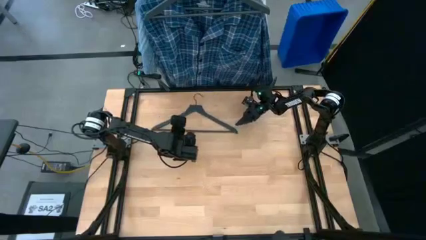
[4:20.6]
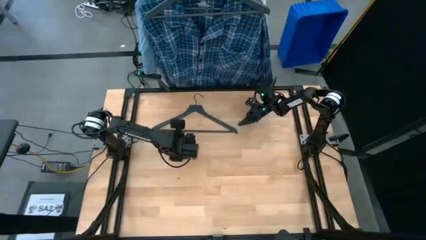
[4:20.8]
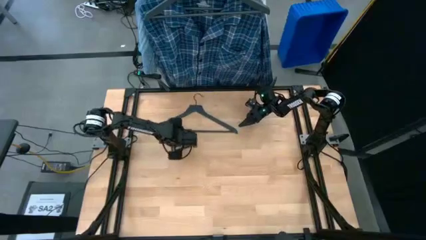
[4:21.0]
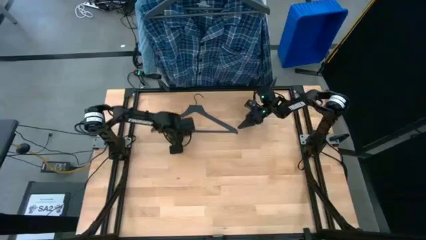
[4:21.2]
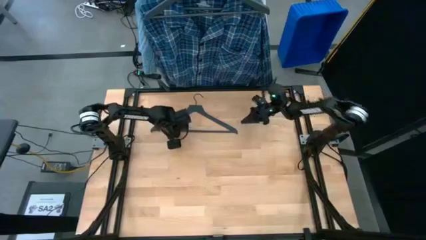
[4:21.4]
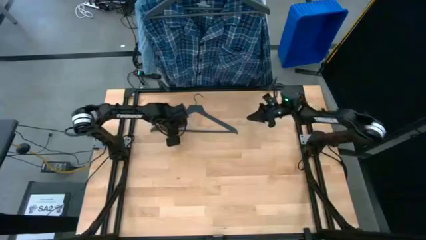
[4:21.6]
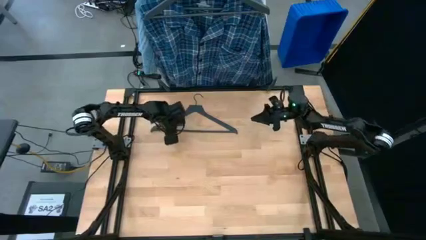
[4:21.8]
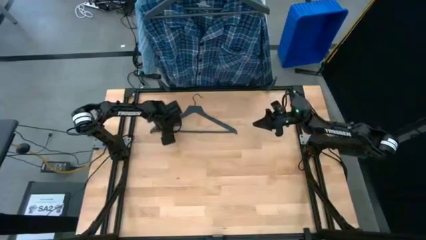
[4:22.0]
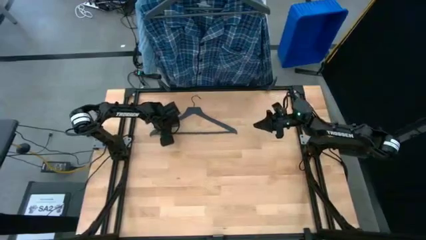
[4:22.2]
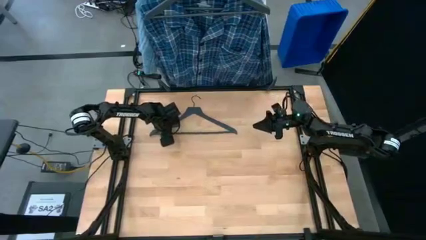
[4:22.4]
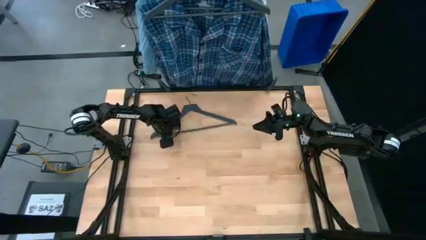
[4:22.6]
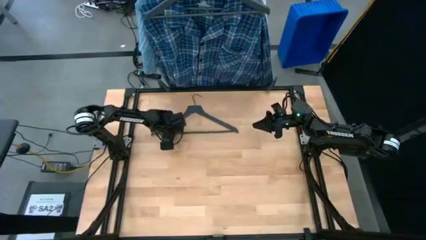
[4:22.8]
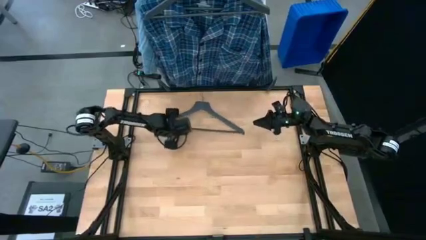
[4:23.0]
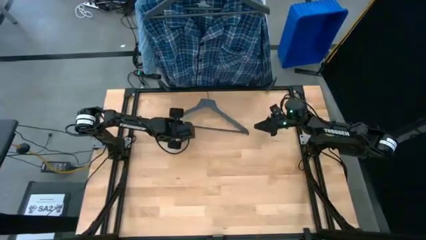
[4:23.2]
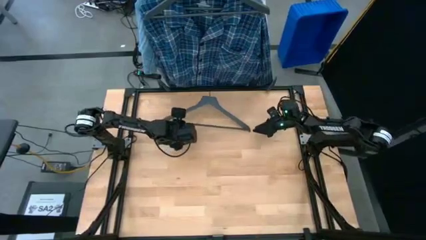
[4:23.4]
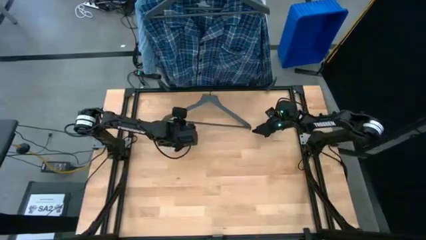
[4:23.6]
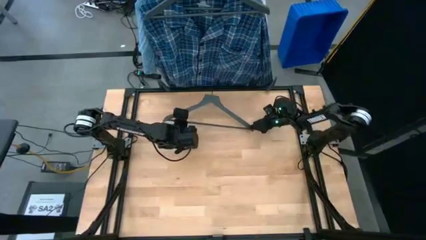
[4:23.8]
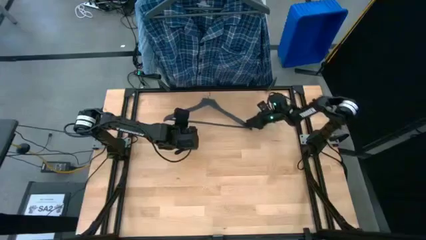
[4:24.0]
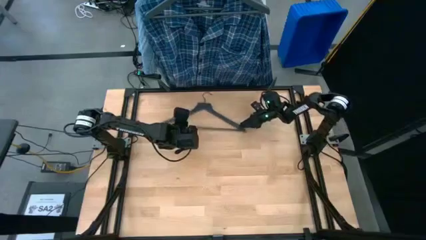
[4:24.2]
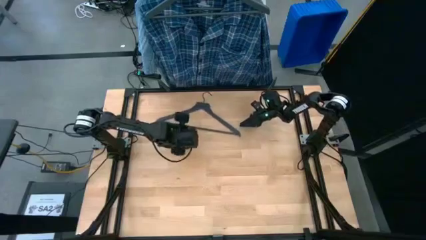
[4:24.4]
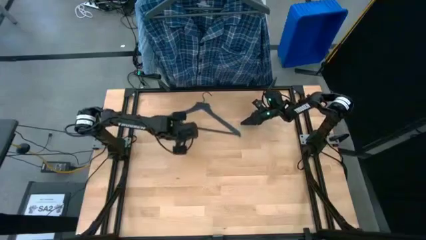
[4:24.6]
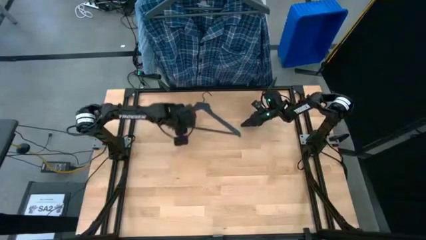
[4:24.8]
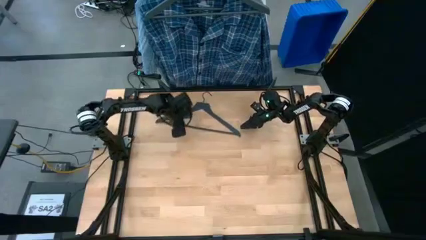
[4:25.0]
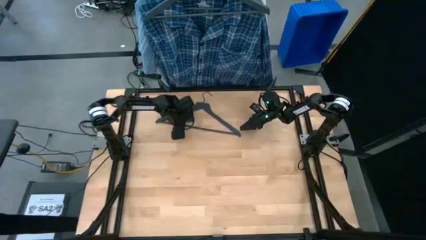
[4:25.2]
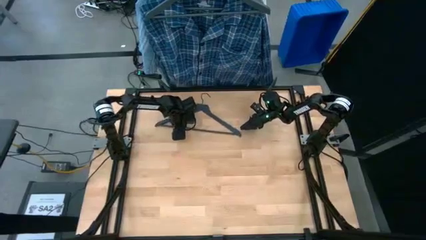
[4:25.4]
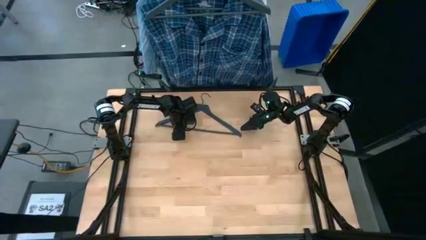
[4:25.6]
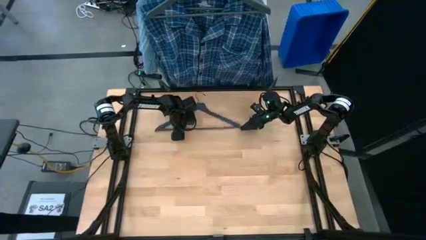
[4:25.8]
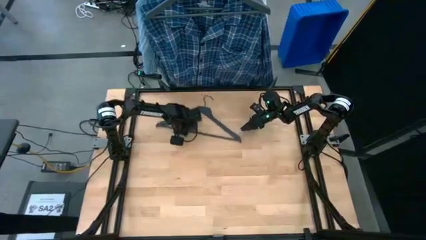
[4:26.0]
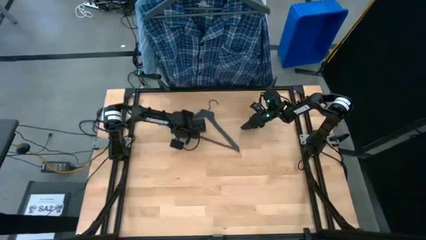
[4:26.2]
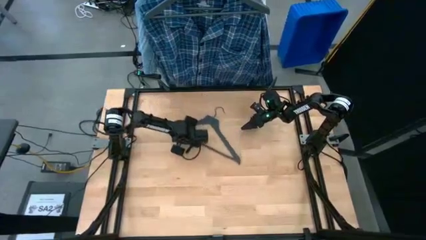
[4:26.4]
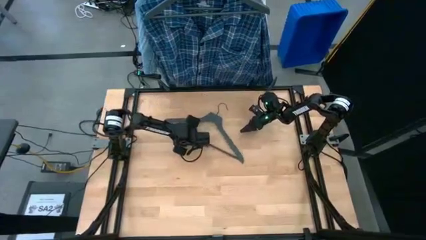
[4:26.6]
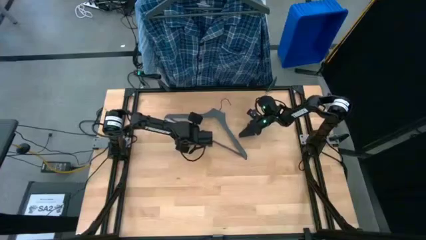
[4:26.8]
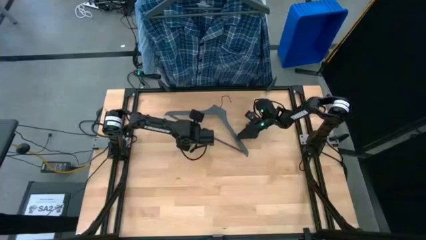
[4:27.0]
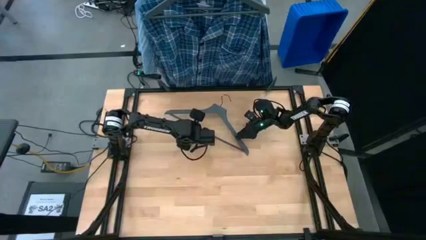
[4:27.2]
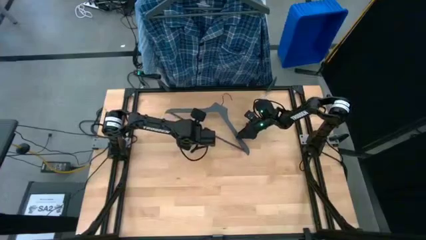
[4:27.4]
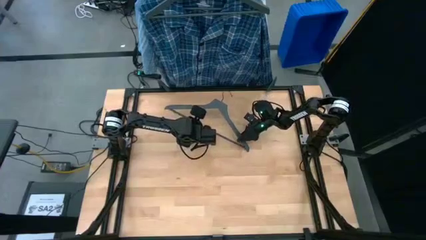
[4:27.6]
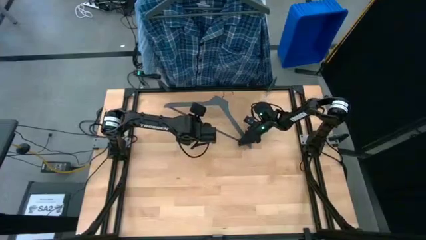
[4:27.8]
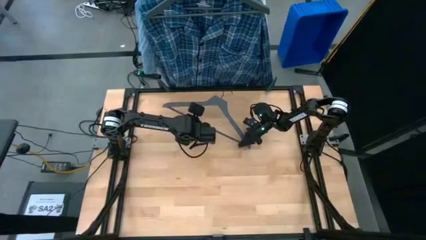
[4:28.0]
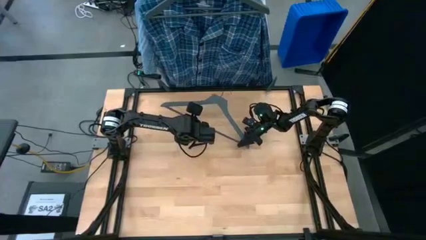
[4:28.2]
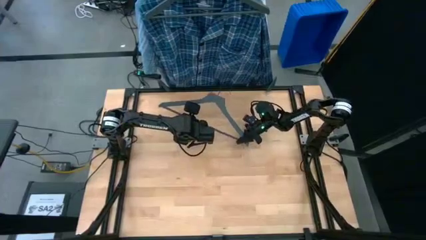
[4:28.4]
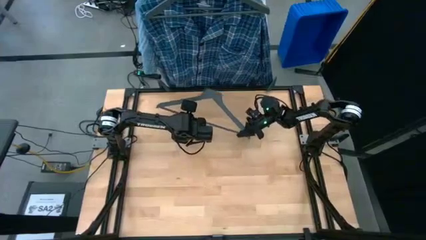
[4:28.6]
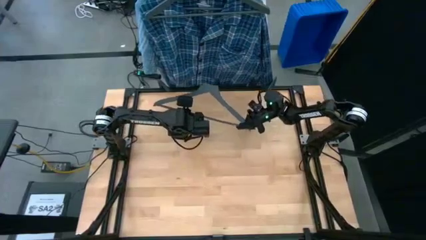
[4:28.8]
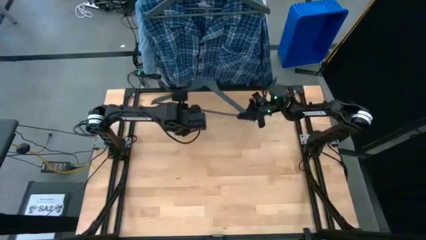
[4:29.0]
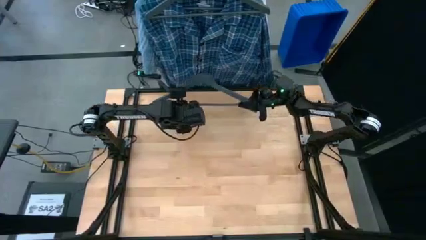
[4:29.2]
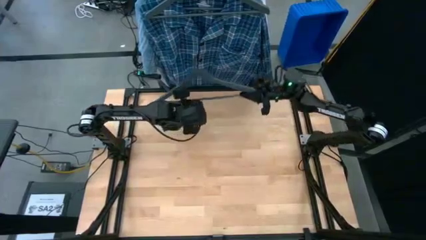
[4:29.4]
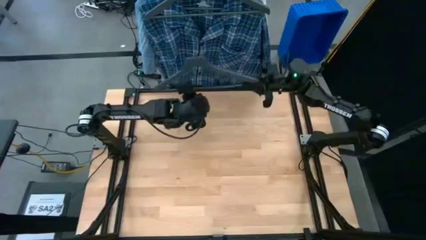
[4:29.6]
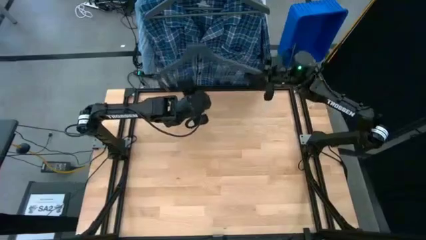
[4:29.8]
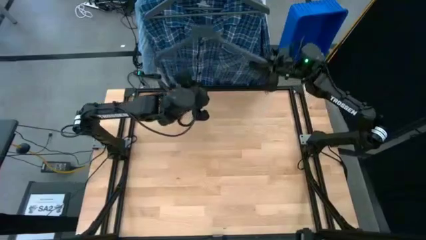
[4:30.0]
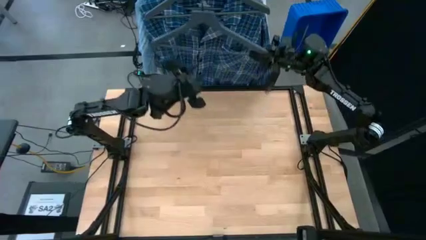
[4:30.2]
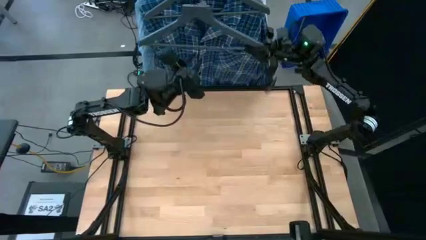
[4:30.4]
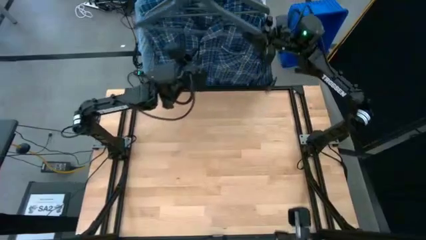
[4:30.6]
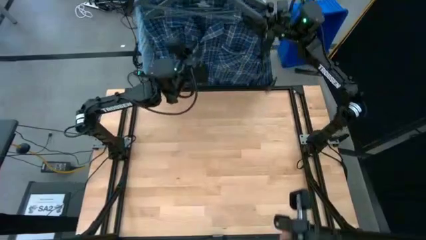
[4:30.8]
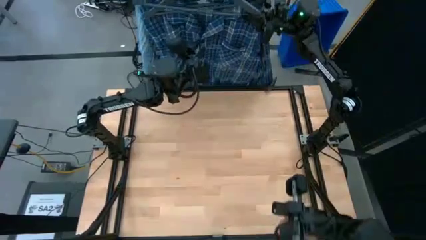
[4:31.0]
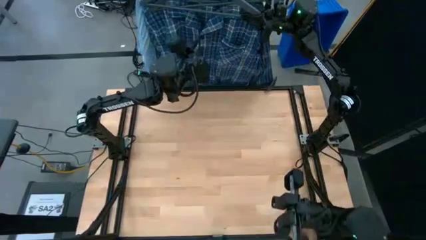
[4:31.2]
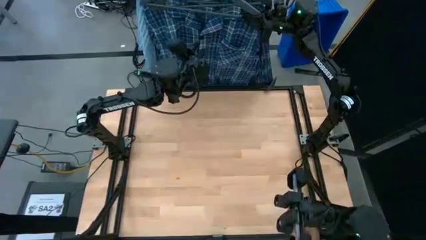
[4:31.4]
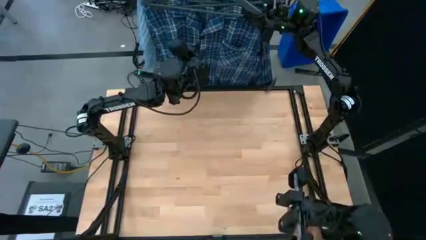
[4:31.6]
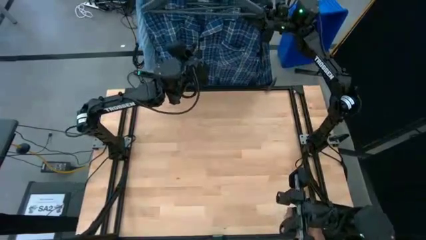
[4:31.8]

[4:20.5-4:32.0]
Task: Hang clothes
Hang the black hanger on the hanging rack

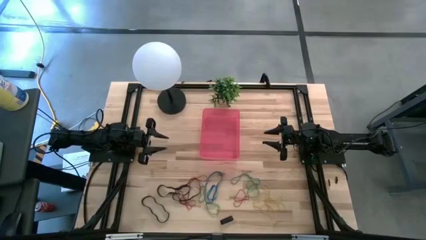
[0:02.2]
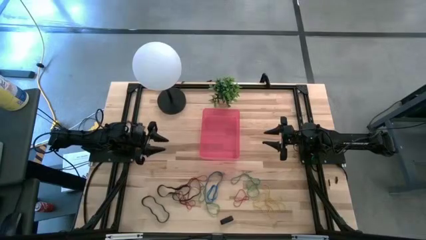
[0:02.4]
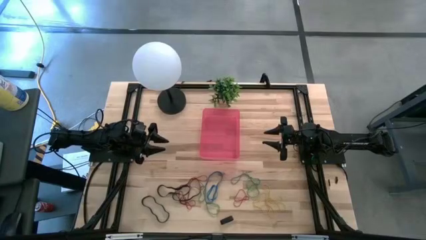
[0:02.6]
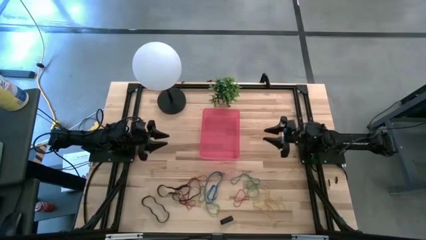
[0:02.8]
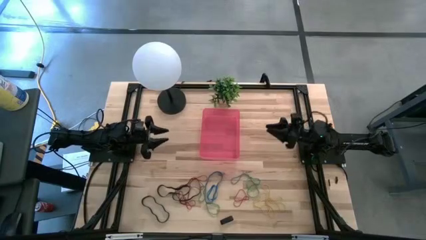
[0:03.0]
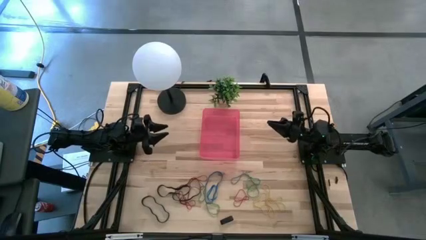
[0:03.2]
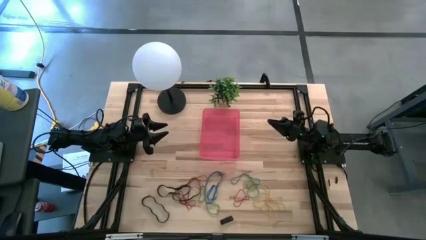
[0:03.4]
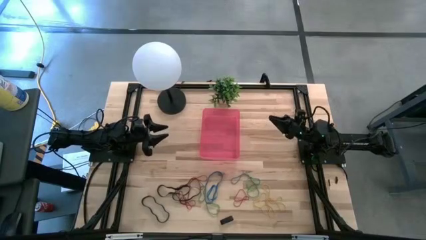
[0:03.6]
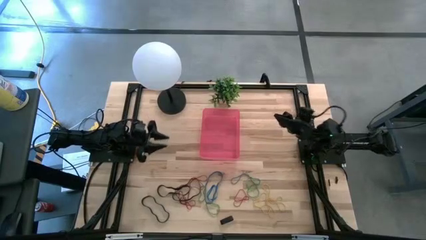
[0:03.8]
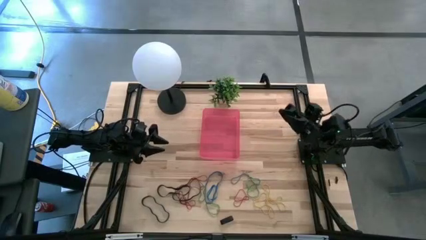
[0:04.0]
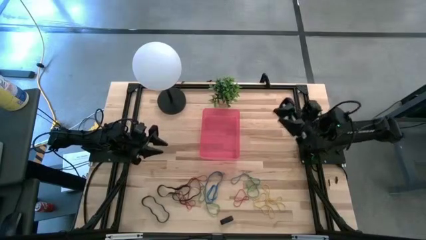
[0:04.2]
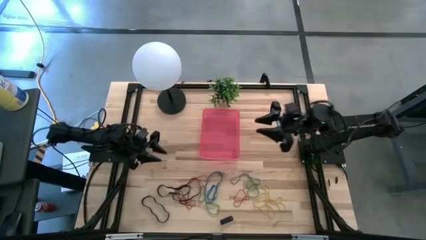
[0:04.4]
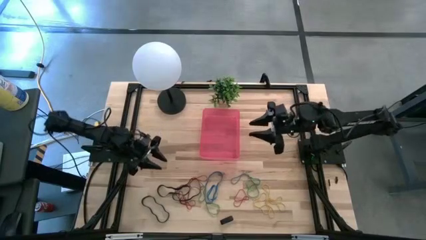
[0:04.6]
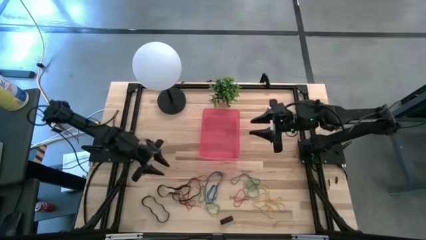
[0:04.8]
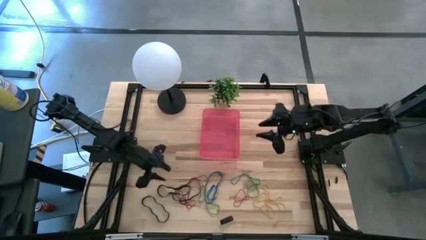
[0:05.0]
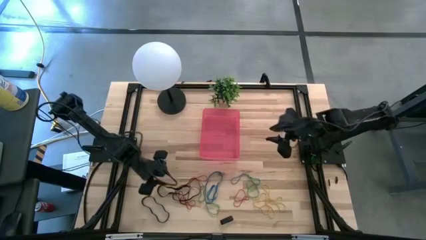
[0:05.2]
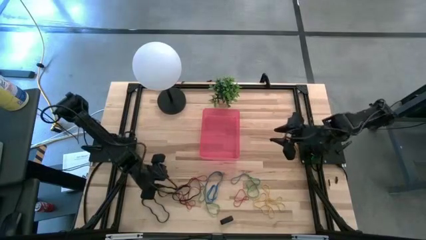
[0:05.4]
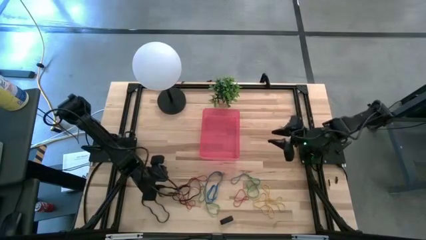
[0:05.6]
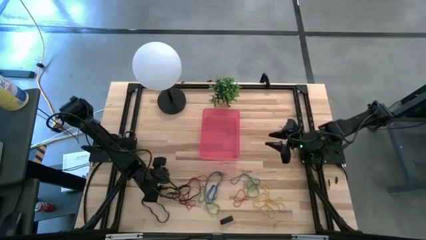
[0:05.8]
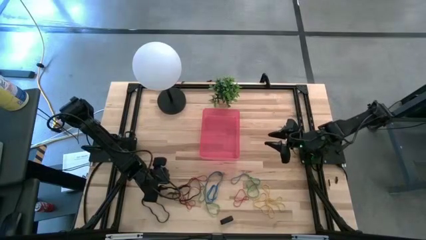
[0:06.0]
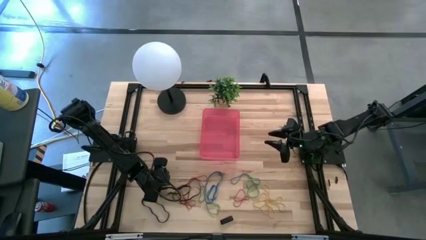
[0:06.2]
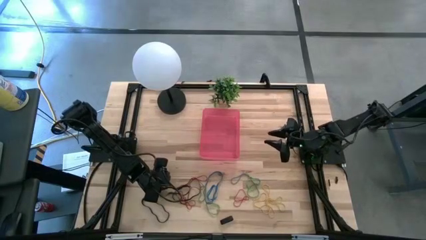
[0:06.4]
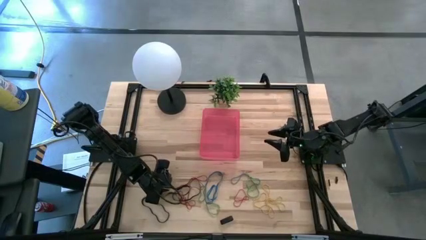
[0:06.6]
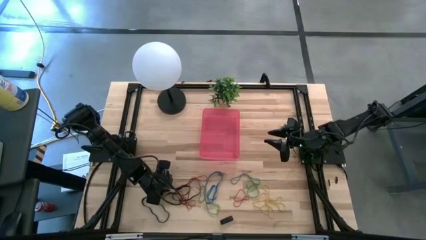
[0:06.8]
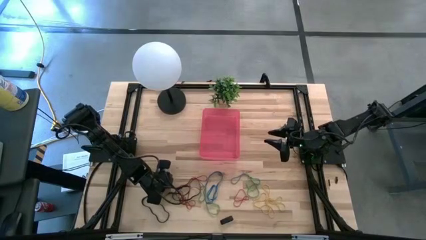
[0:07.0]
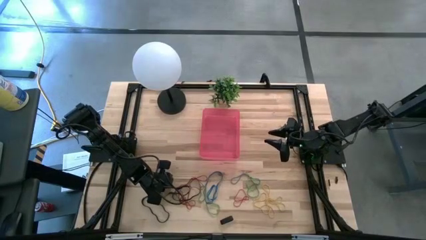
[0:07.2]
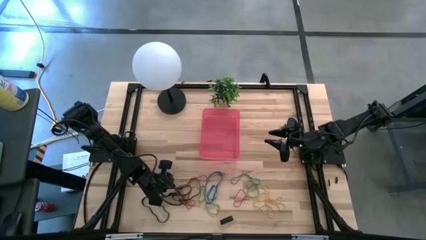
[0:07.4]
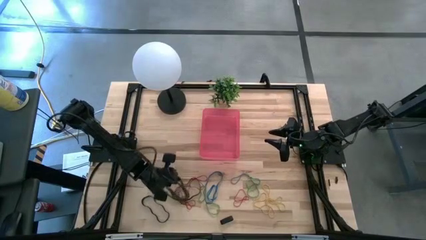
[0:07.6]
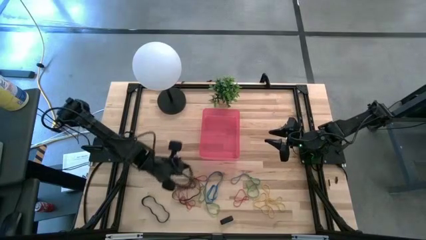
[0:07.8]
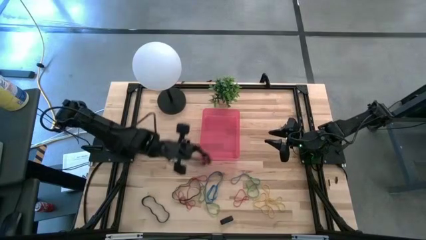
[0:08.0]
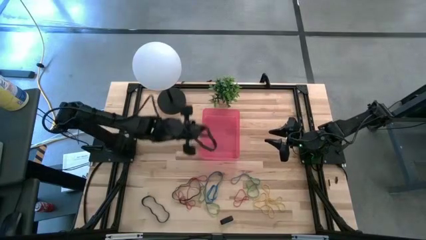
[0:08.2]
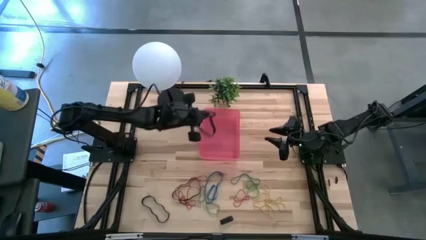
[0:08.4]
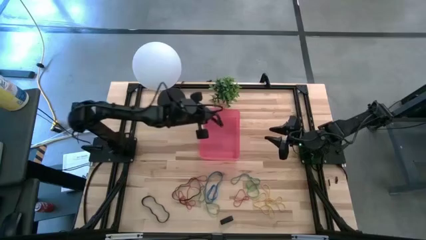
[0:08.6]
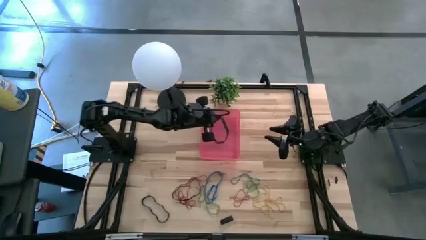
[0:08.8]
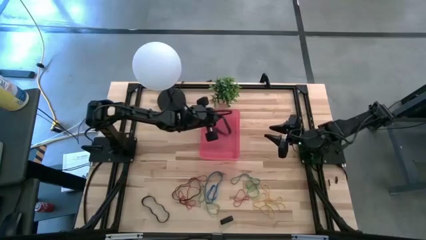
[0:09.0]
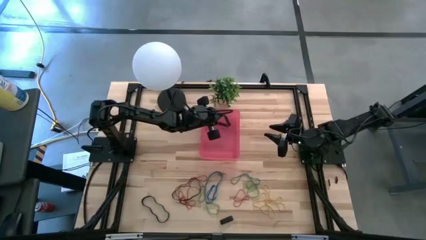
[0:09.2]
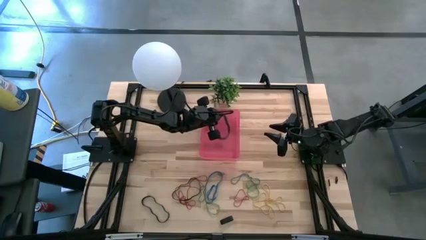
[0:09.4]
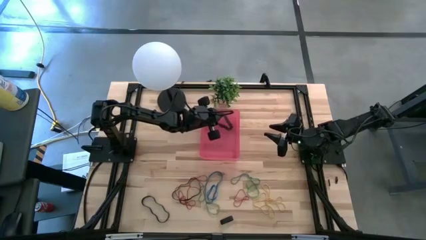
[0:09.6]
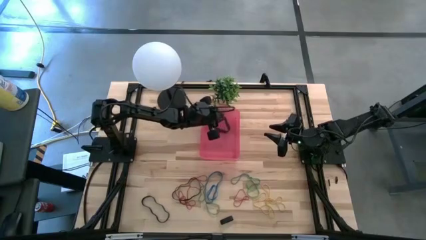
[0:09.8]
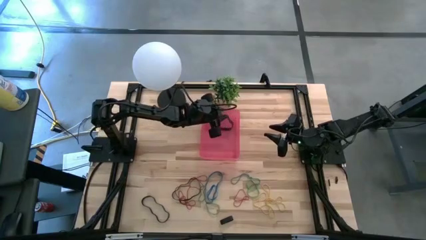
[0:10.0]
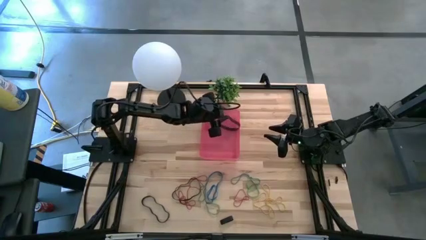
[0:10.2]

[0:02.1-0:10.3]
Task: Pick and place rubber bands into bin
Put the black rubber band into the red bin
